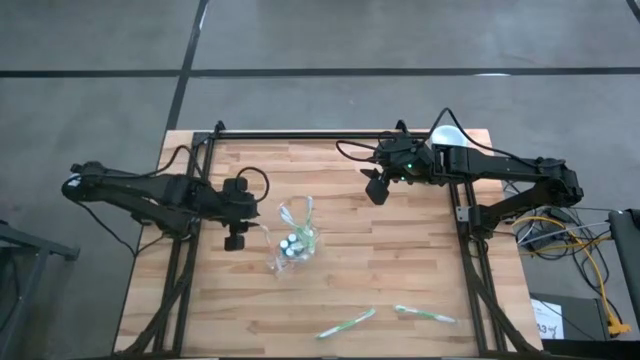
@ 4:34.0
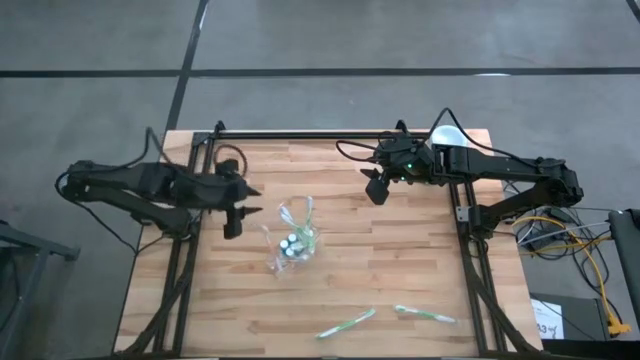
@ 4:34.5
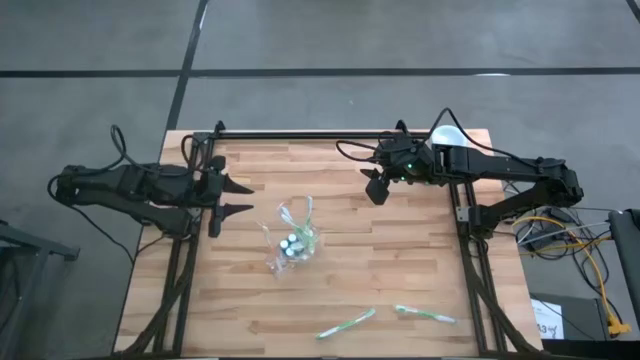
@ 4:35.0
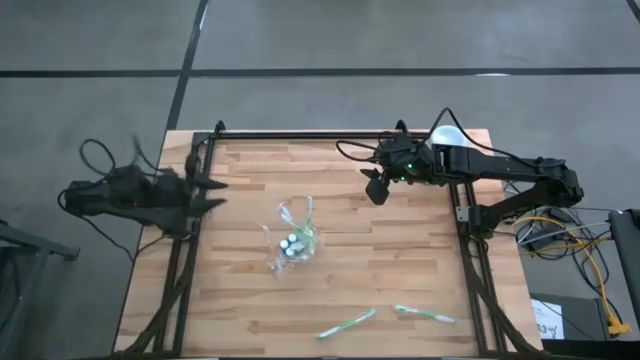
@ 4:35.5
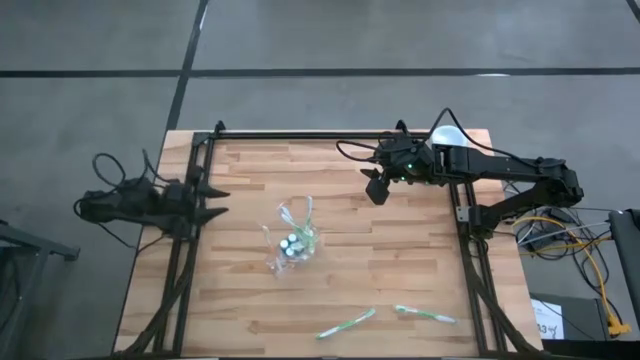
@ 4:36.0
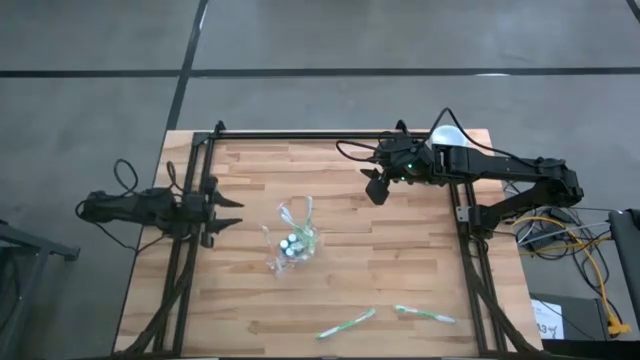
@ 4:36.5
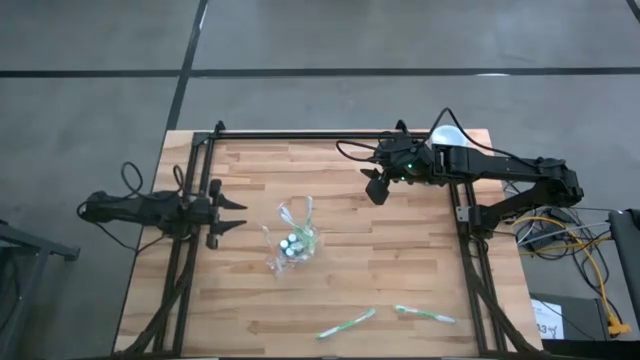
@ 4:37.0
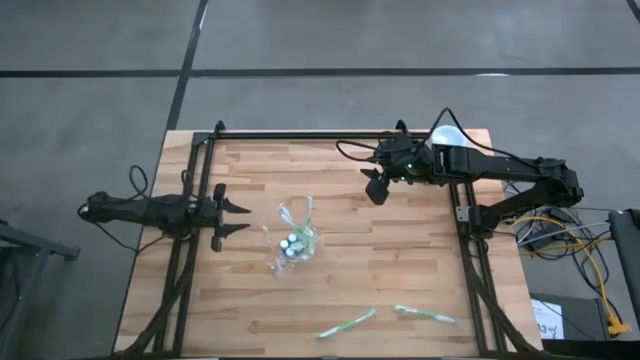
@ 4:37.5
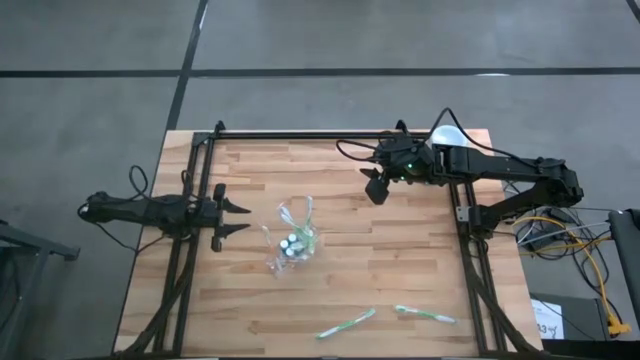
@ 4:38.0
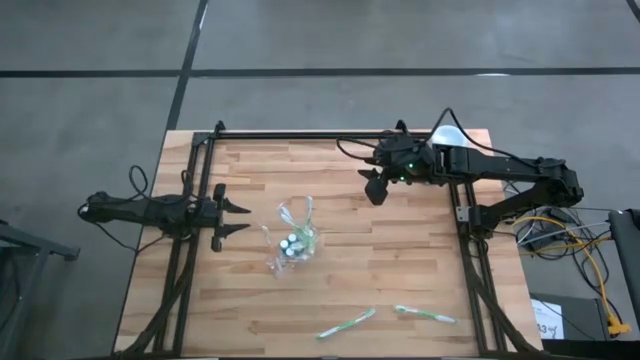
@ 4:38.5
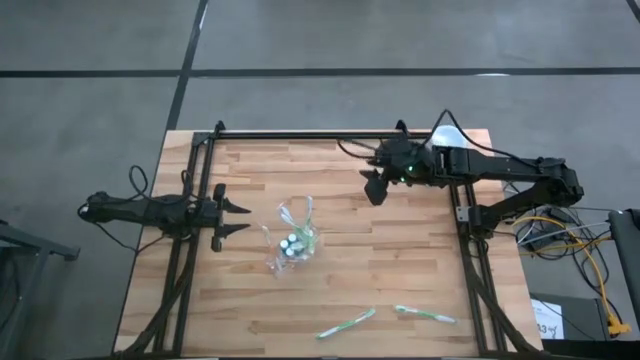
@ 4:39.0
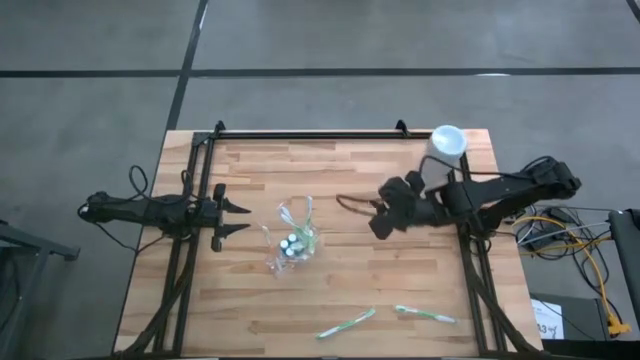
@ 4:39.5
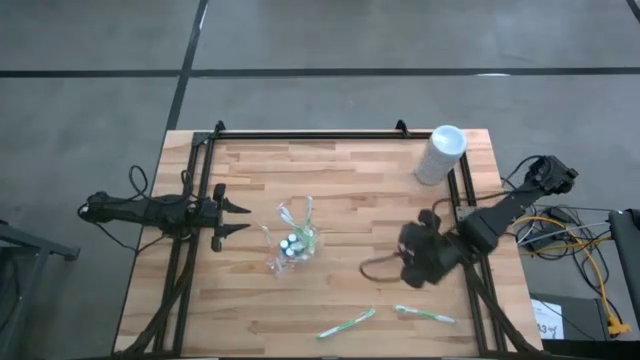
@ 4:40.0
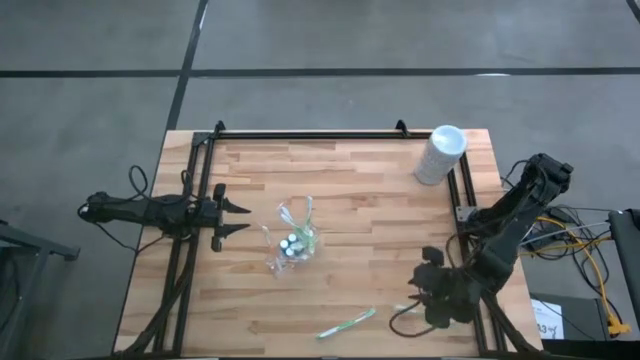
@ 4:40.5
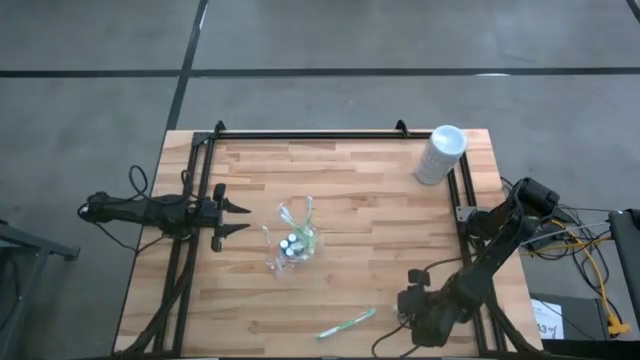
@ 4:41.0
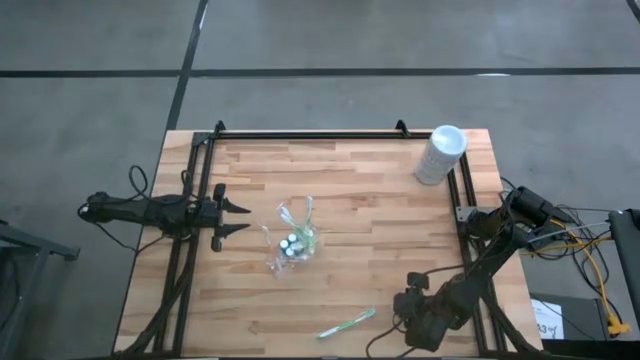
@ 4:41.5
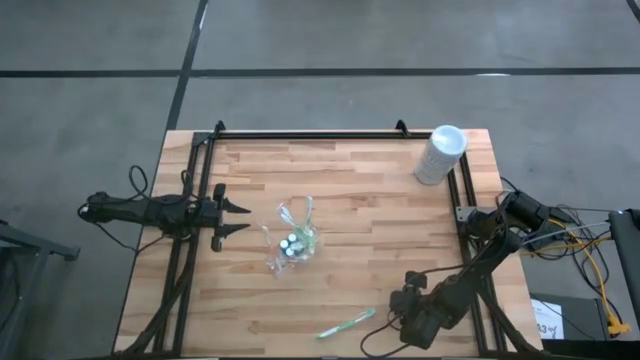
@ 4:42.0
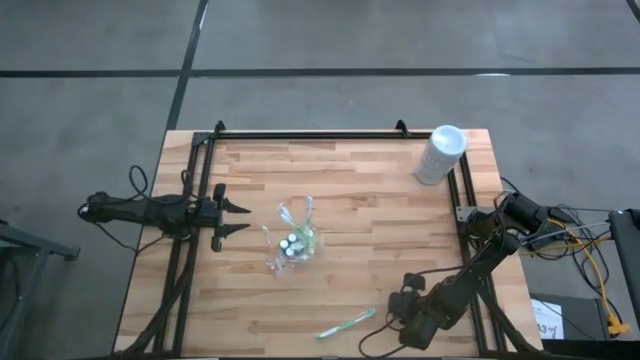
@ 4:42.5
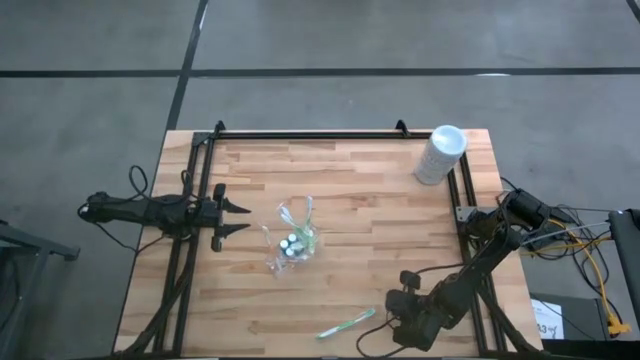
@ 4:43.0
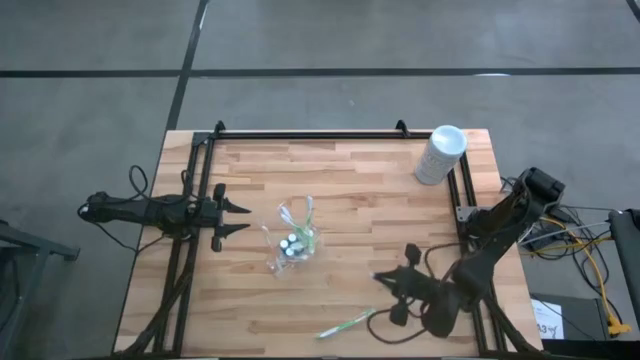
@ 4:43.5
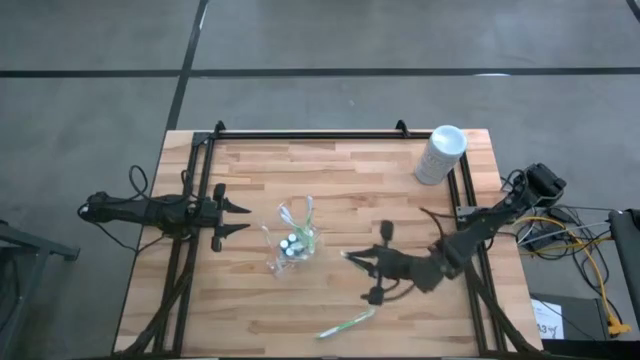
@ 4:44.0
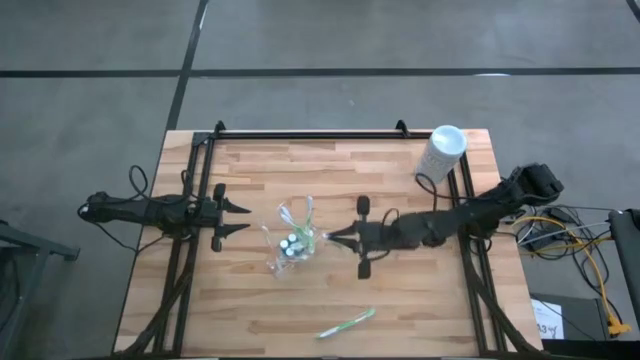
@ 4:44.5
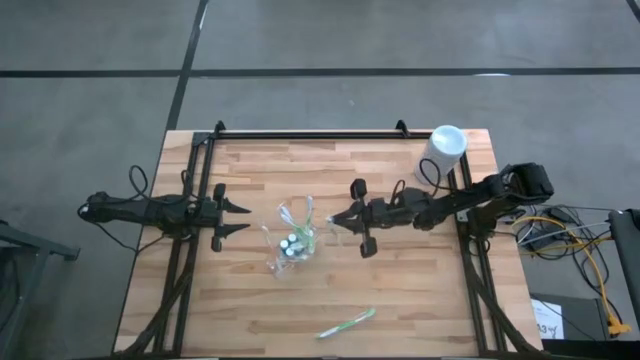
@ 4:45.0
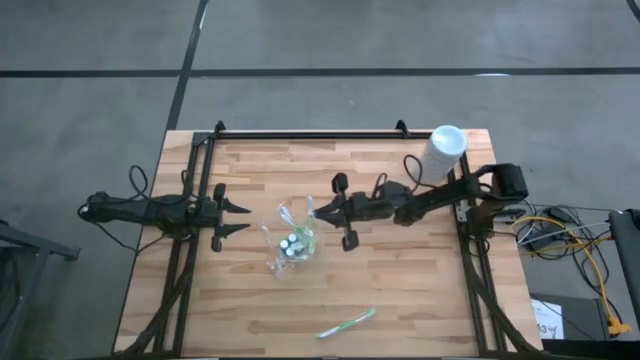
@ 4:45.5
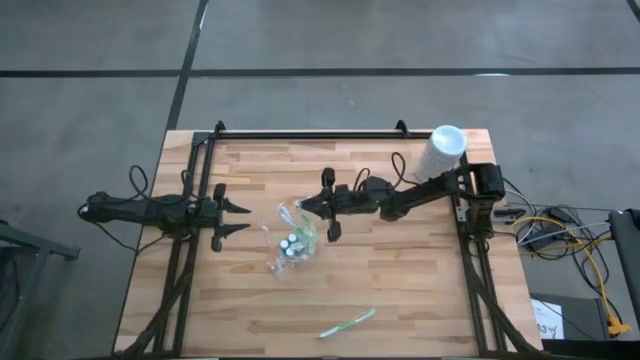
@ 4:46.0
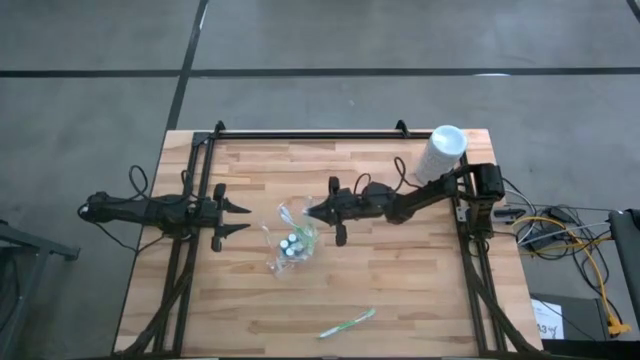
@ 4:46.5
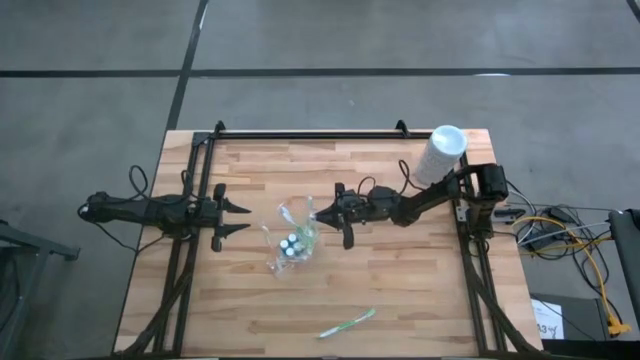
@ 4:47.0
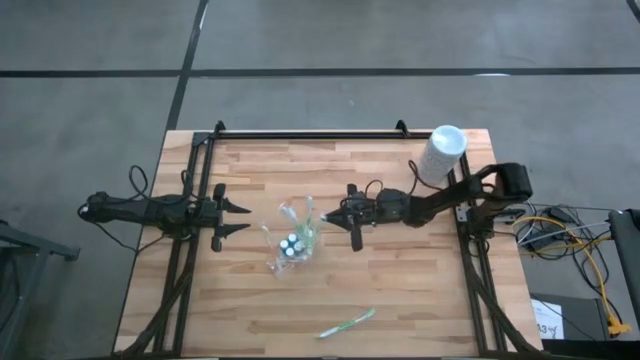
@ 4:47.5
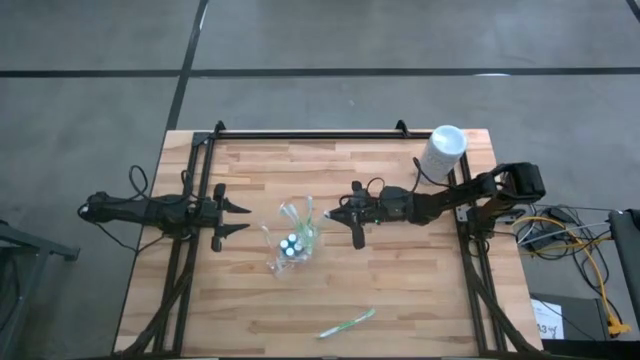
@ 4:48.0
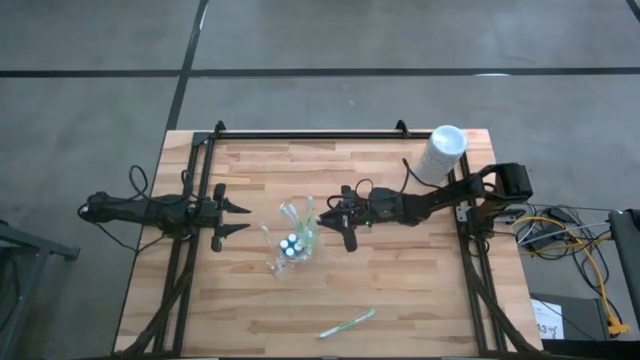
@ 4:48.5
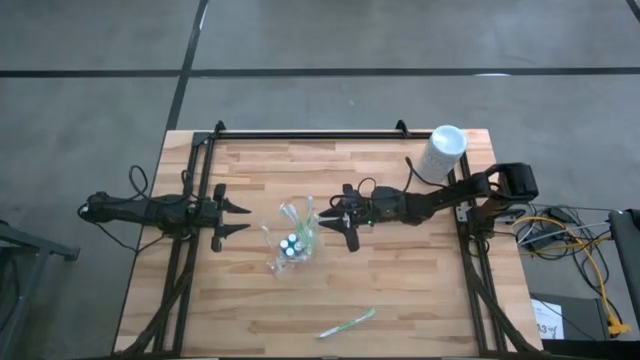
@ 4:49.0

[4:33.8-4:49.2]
Task: Pick & Place toothbrushing station
Put the green toothbrush into the transparent organizer

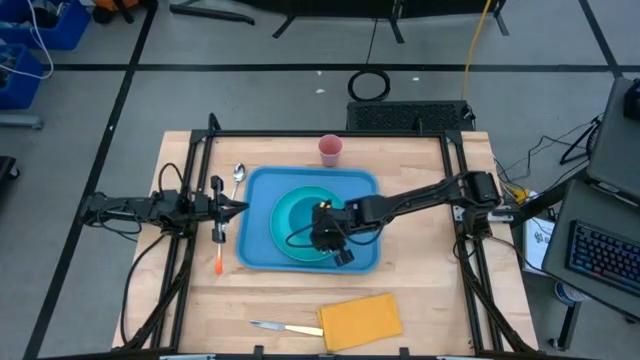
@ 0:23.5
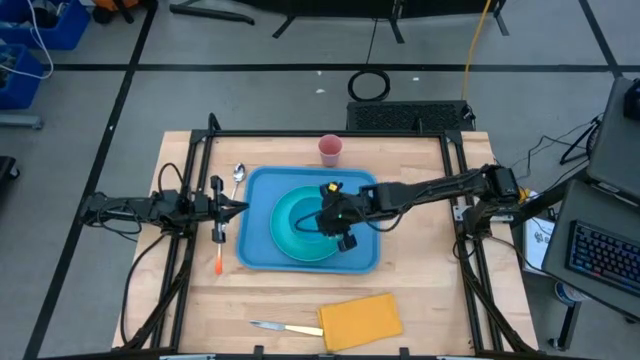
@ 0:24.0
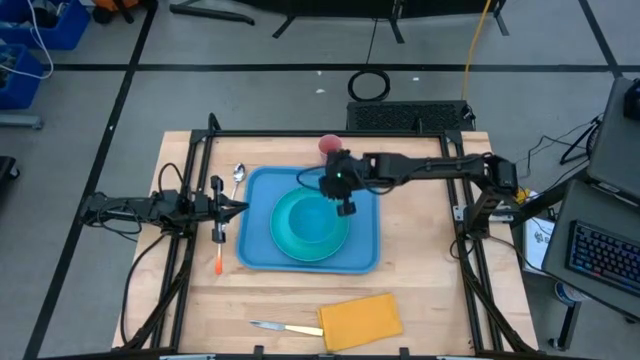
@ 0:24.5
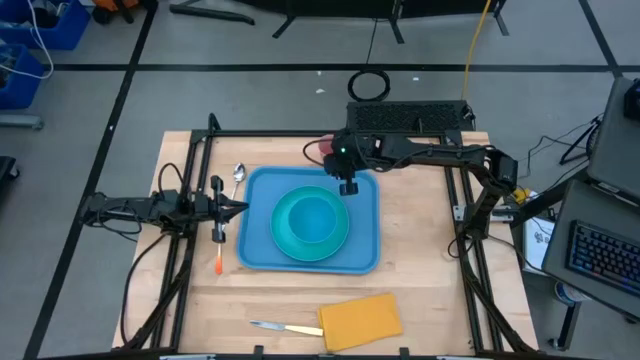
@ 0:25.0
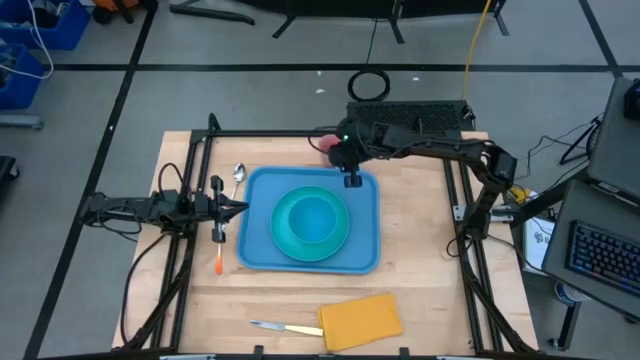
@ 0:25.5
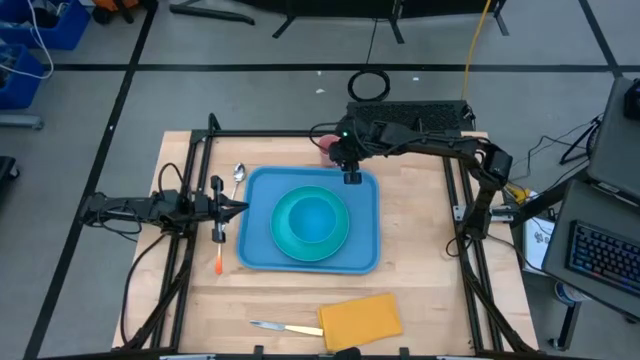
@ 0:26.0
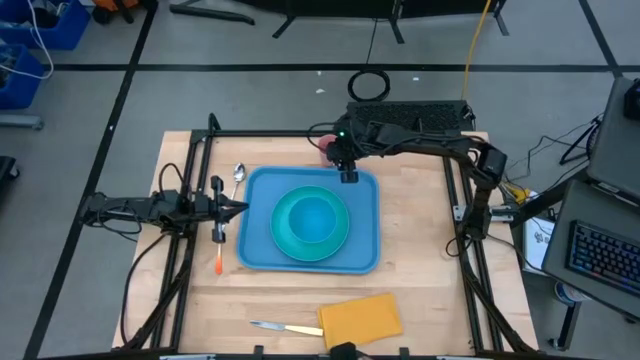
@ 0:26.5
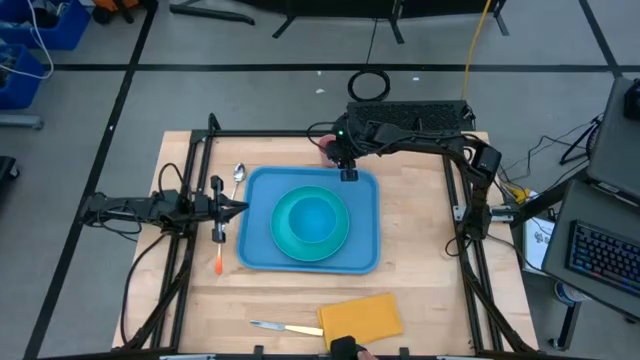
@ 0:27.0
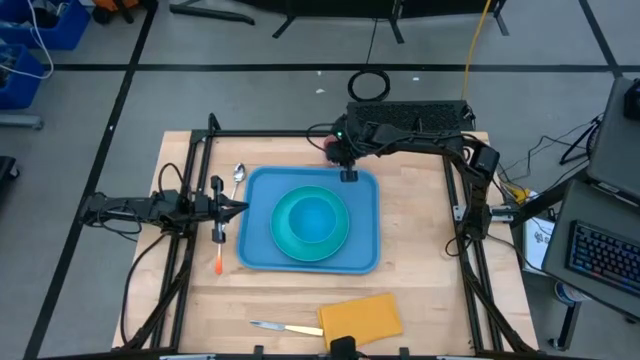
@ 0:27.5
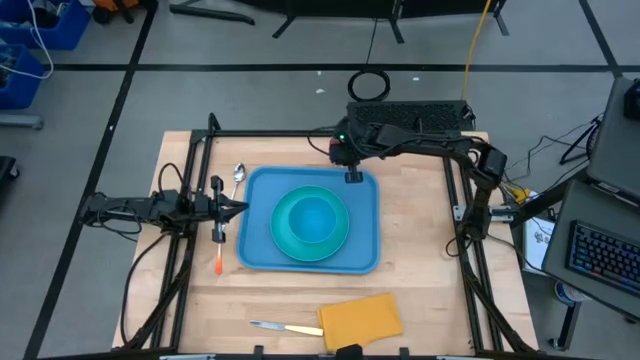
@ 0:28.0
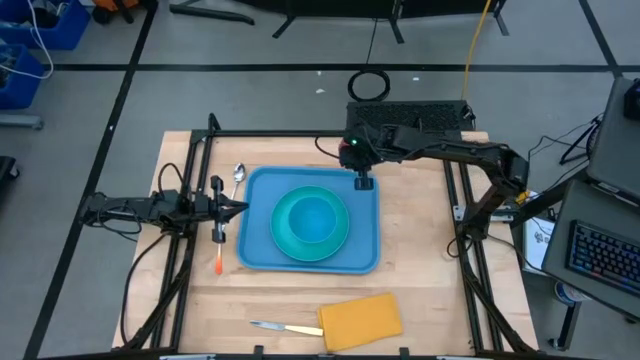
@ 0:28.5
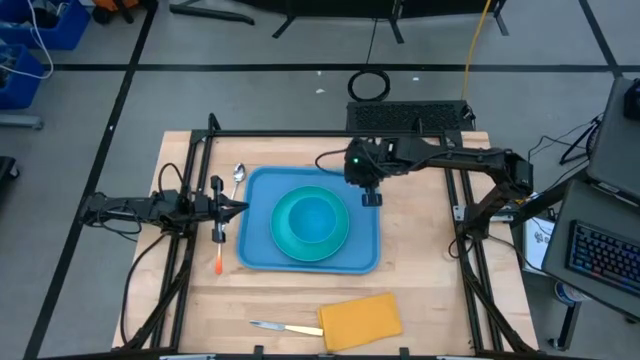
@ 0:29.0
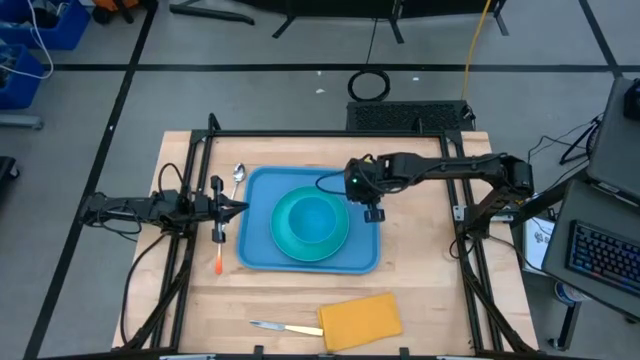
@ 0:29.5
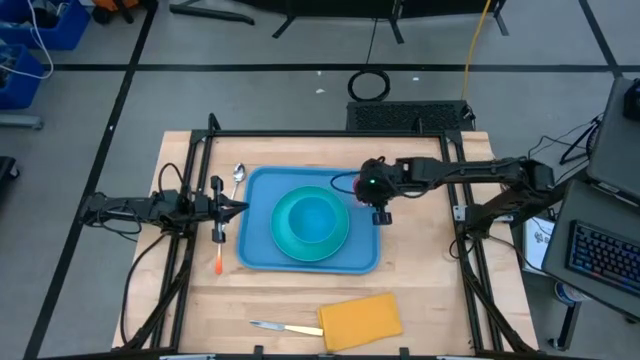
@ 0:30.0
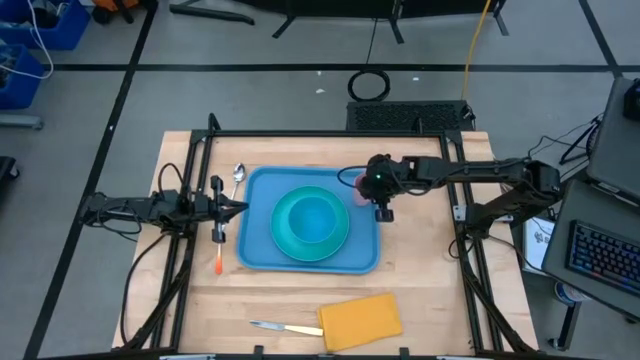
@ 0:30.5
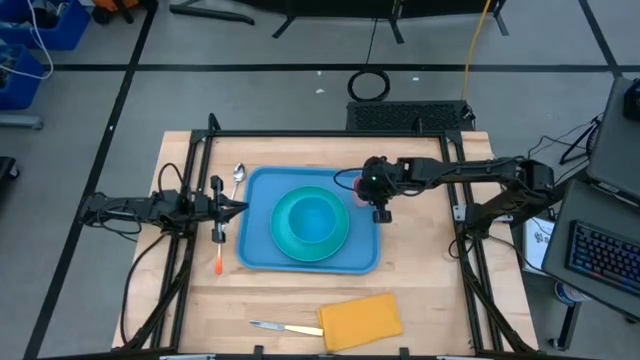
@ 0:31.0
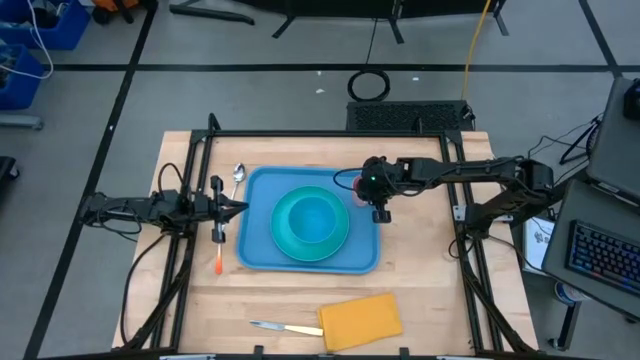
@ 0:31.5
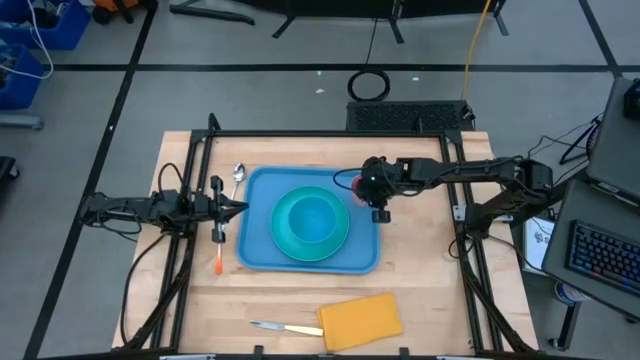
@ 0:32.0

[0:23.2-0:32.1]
Task: Set up tray
Put the pink cup on the blue serving tray to the top right of the blue plate
